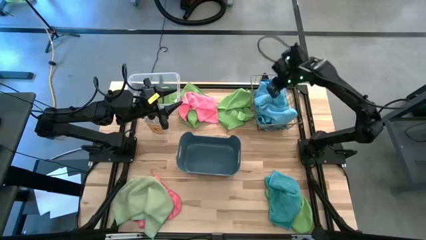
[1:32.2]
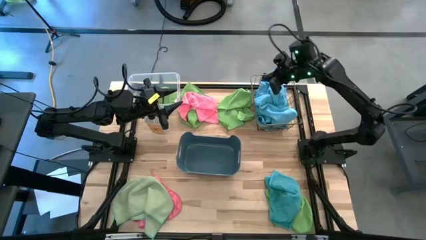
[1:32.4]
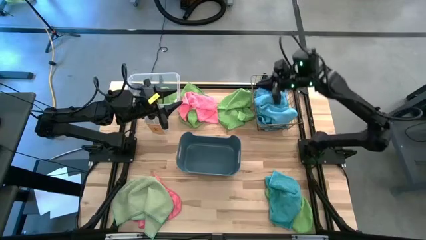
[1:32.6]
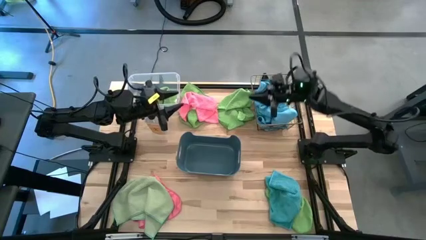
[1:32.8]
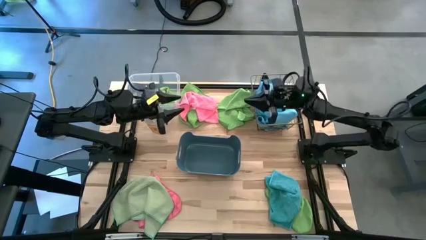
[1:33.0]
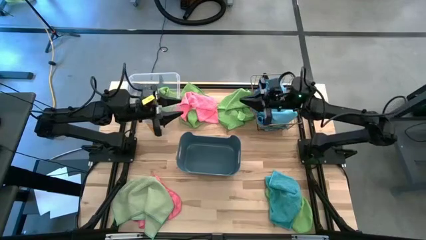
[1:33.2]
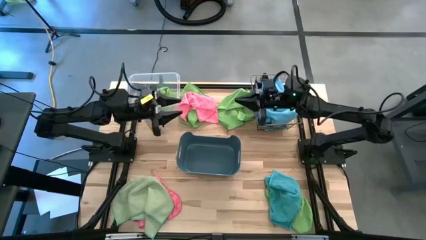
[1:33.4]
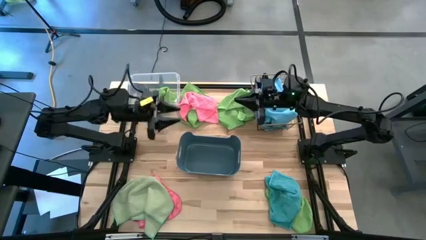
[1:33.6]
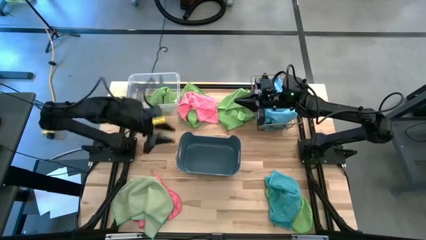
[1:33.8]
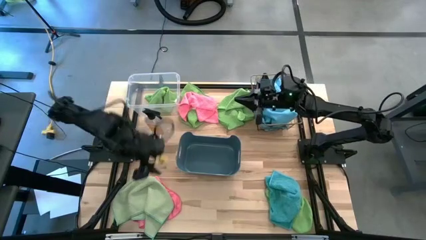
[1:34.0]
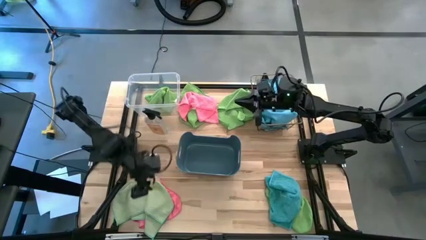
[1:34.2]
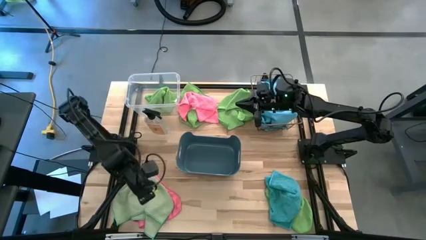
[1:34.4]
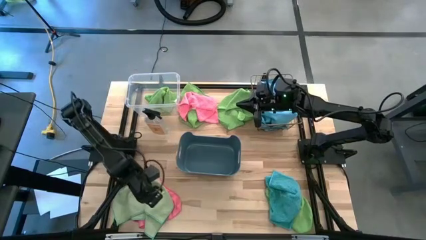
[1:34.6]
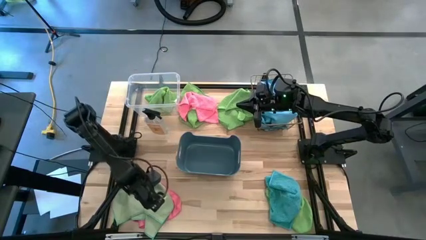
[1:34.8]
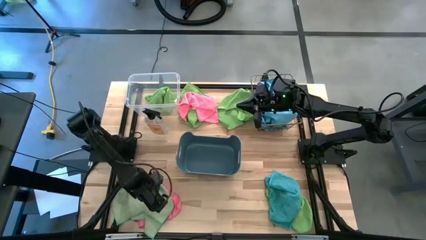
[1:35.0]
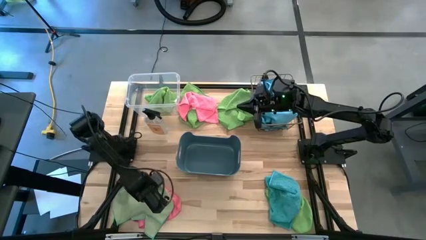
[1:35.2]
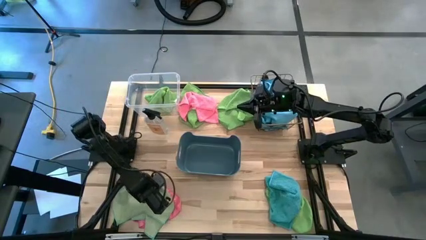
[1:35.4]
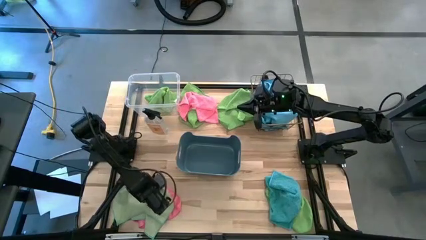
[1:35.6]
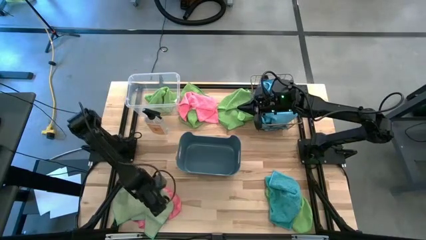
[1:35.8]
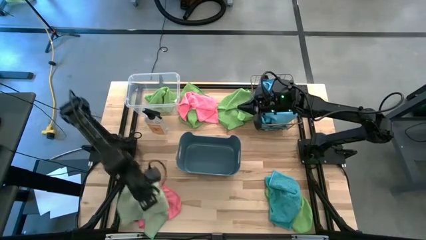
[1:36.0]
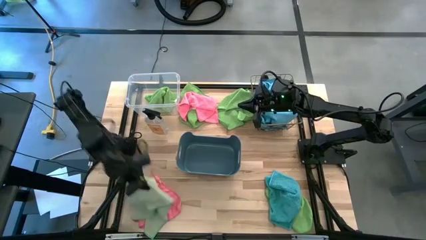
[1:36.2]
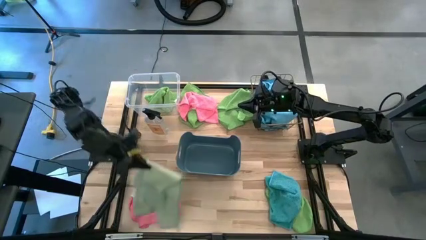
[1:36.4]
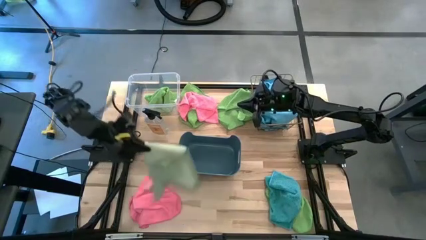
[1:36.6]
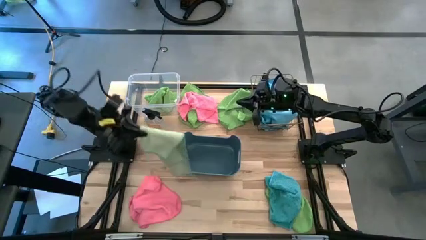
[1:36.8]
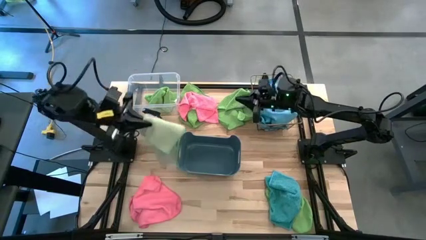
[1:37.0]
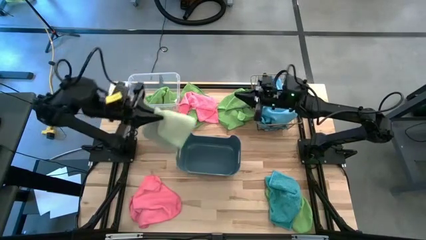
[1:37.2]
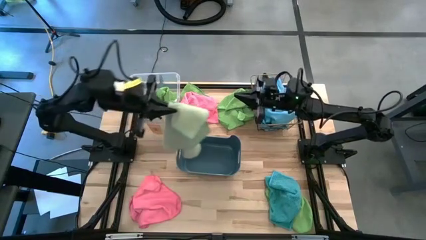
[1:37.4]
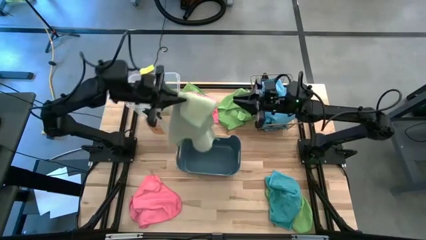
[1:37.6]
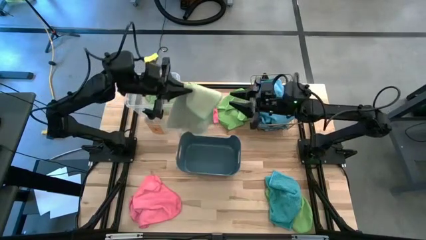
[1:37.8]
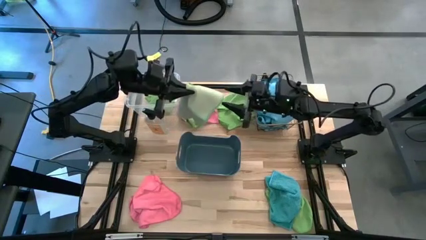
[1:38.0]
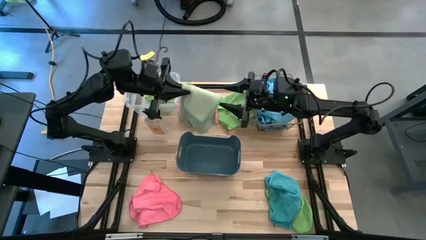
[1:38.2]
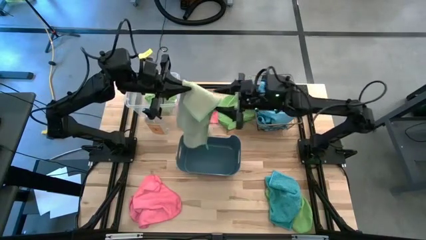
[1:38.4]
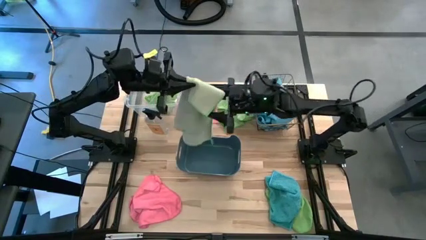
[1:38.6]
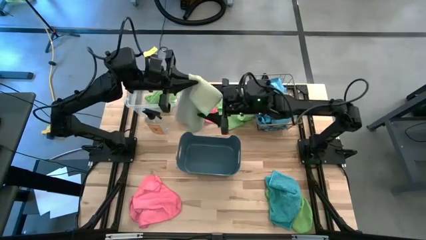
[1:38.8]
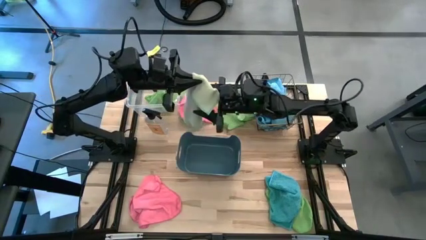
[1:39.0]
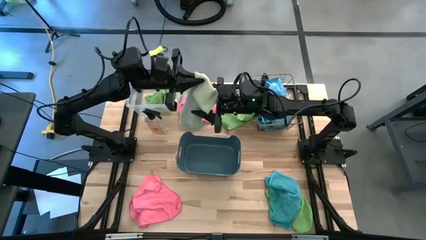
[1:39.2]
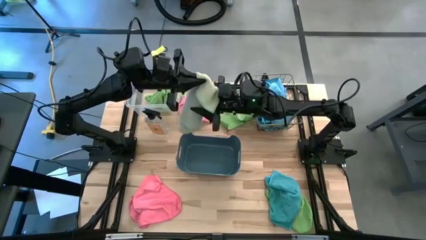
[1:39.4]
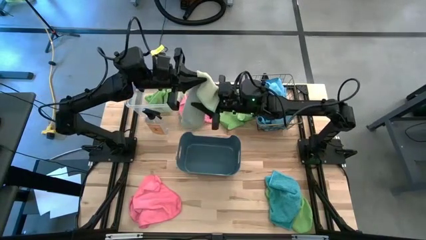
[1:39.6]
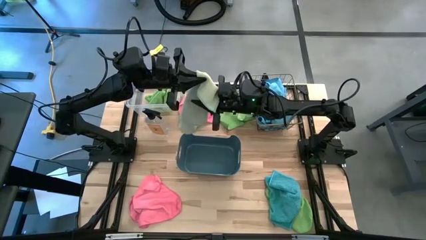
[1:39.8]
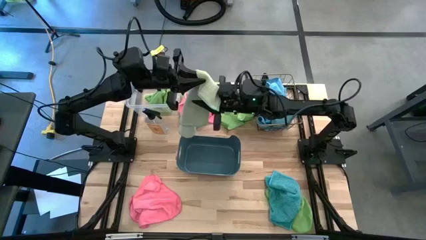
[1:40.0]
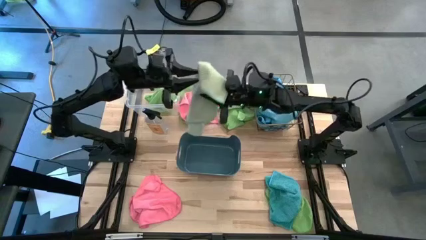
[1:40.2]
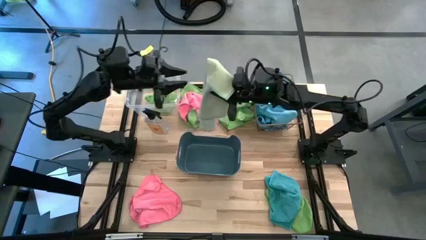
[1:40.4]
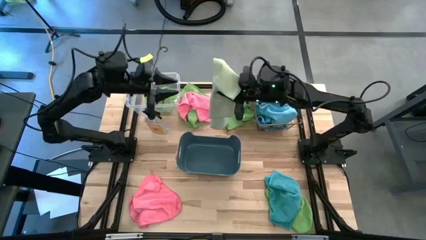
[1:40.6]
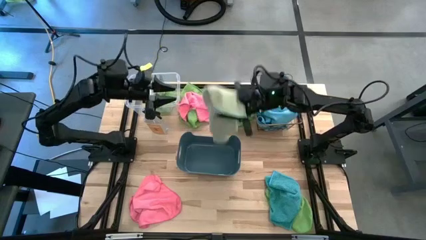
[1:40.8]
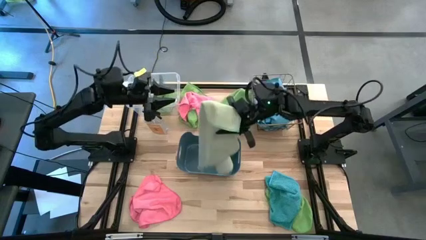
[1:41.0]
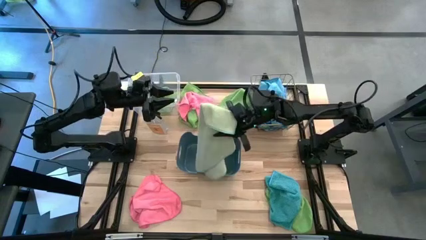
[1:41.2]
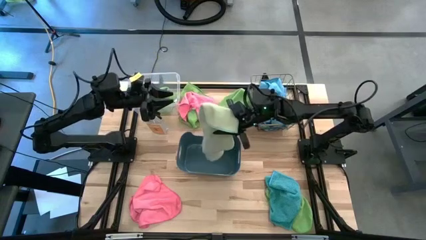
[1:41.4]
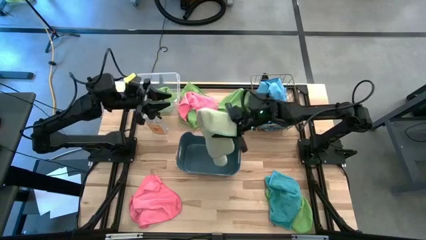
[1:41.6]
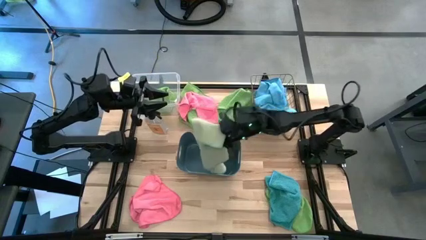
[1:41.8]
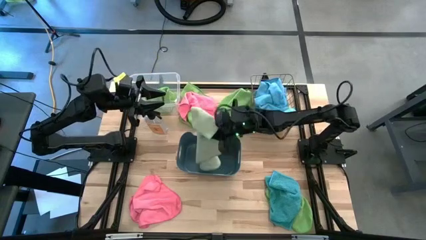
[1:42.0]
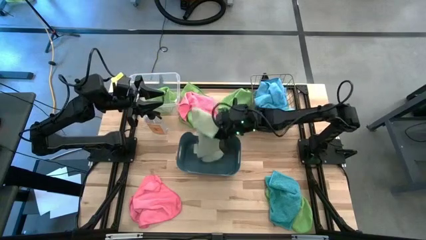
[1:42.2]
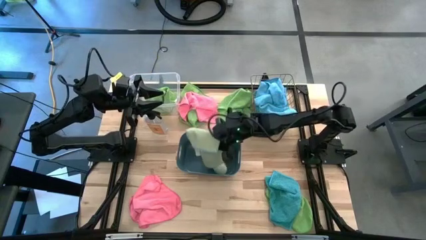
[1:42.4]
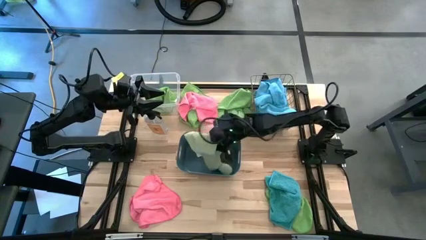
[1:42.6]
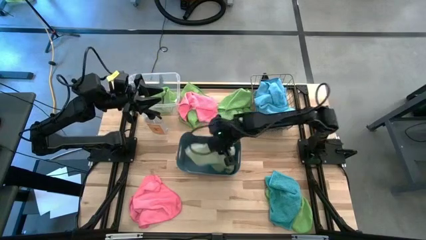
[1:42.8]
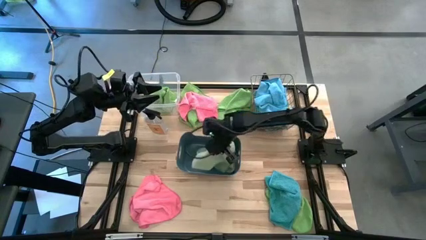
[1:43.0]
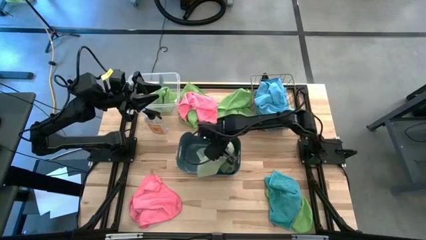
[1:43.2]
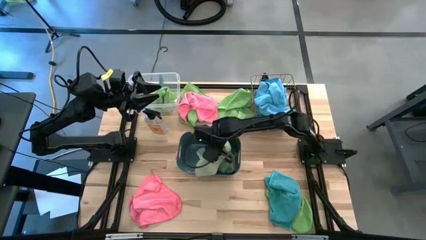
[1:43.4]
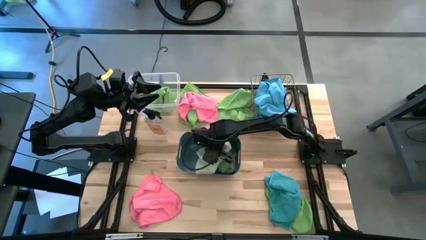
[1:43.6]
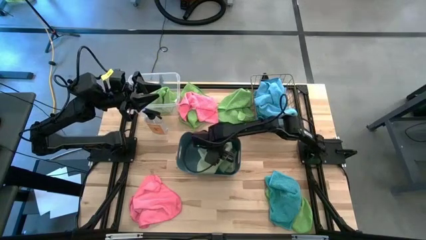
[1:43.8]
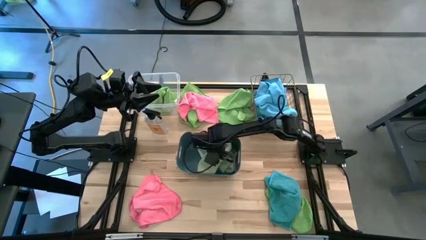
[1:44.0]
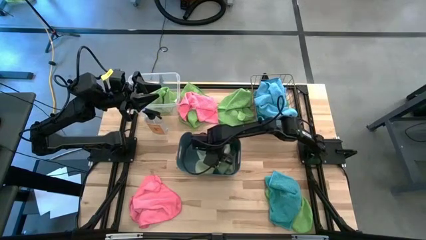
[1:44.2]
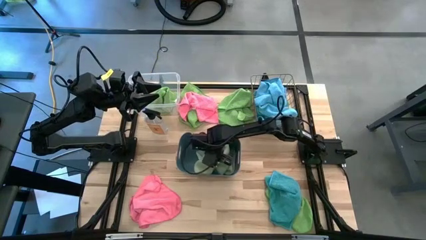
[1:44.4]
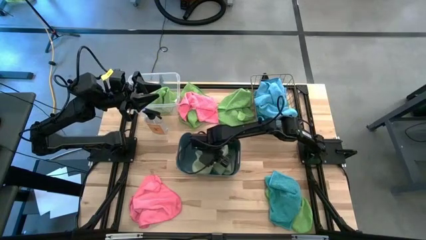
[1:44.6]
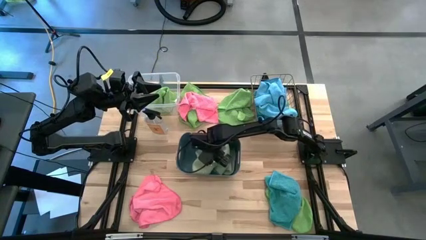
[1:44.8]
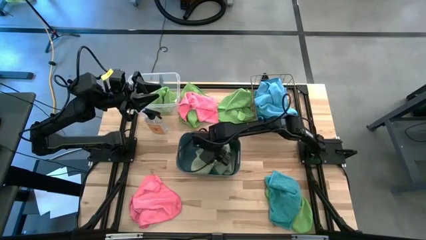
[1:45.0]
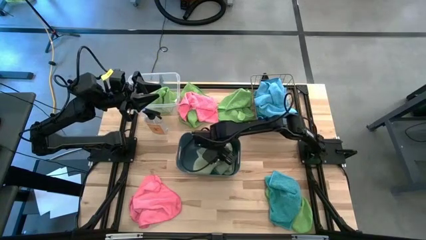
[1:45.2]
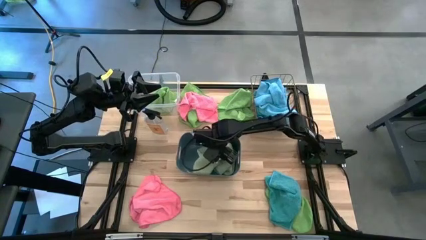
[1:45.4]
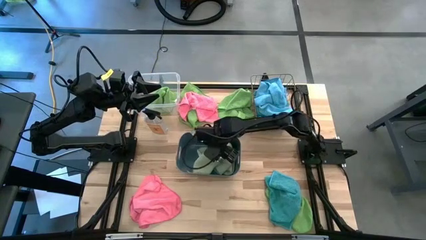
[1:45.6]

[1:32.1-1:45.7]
Task: Sort microfiber towel by color & place in baskets
Put the green microfiber cloth into the blue bin
